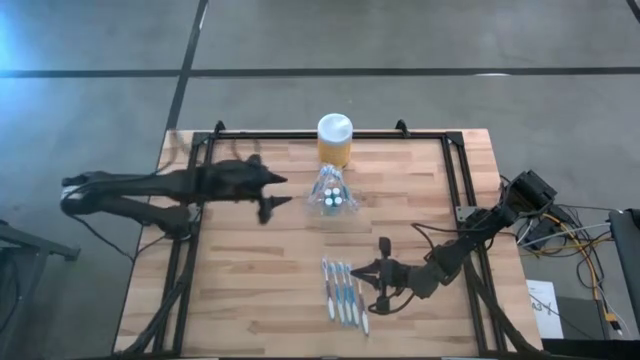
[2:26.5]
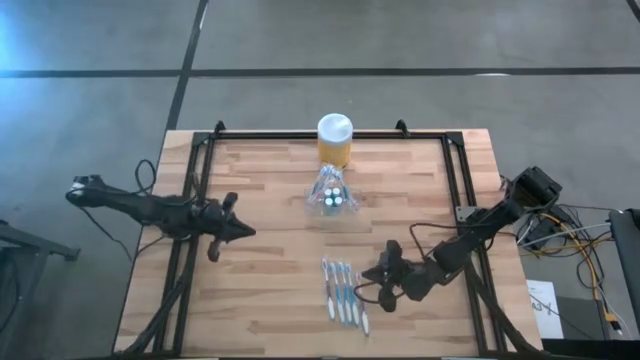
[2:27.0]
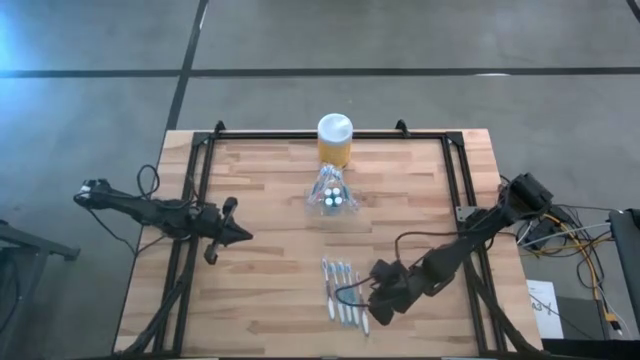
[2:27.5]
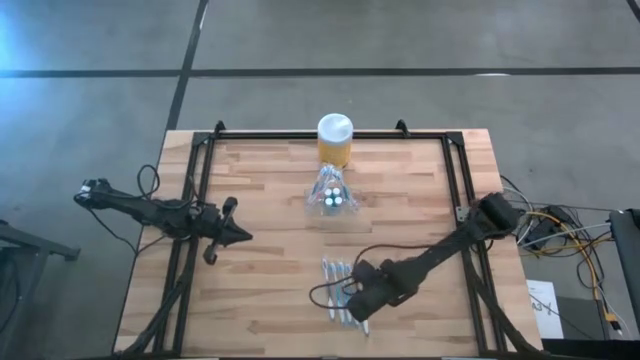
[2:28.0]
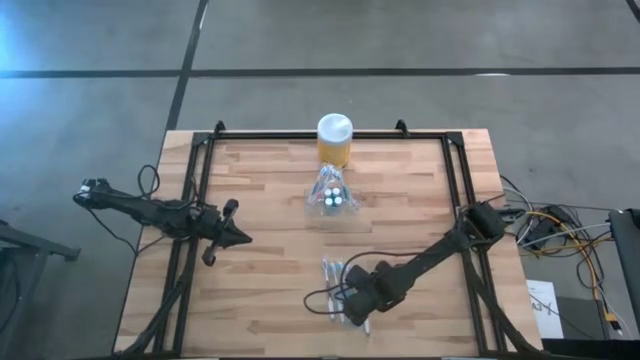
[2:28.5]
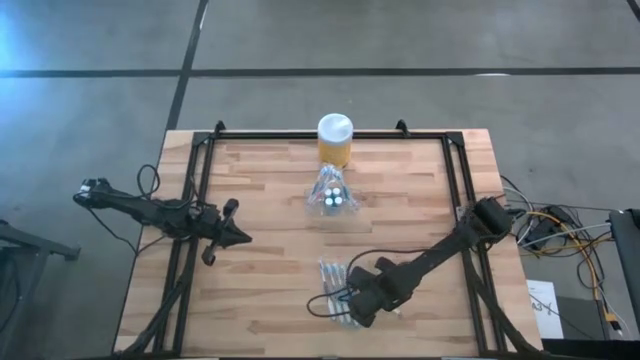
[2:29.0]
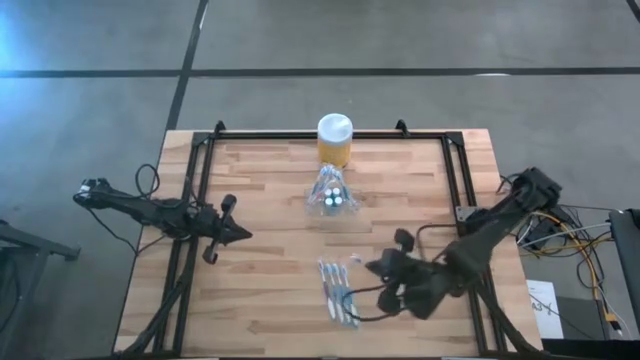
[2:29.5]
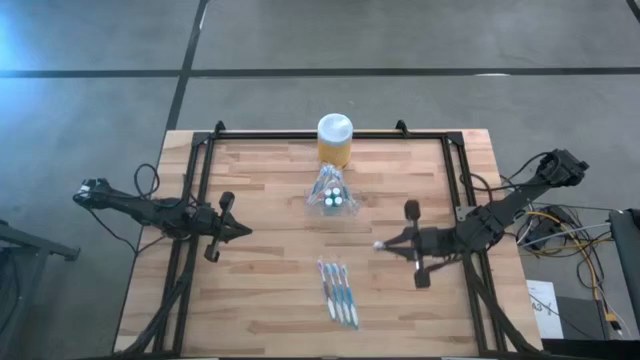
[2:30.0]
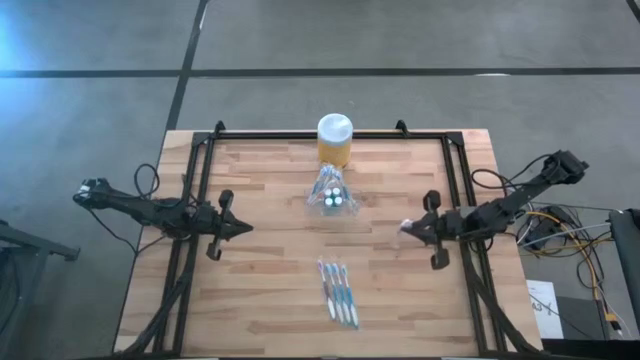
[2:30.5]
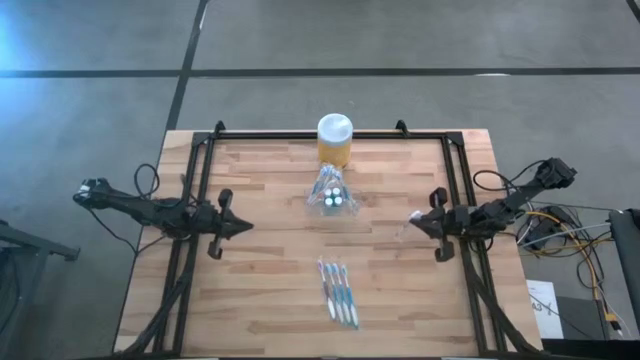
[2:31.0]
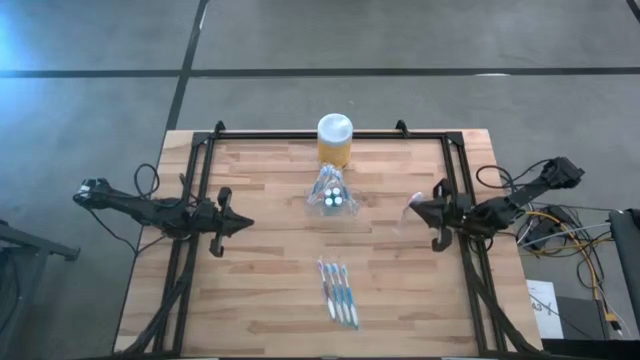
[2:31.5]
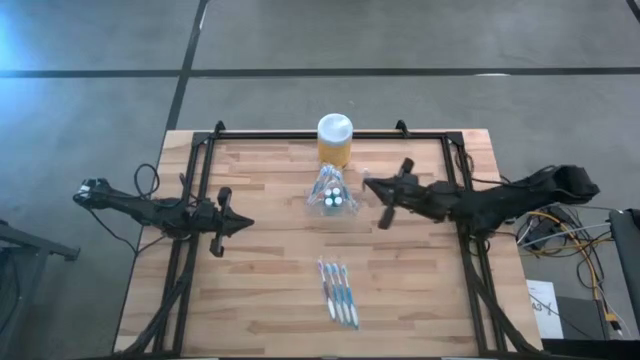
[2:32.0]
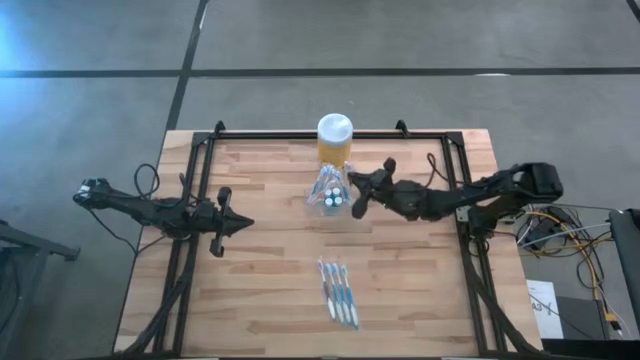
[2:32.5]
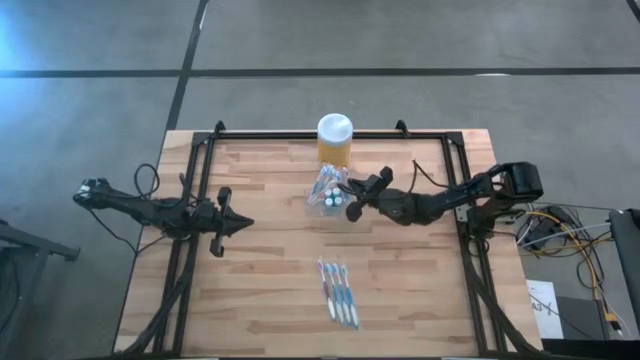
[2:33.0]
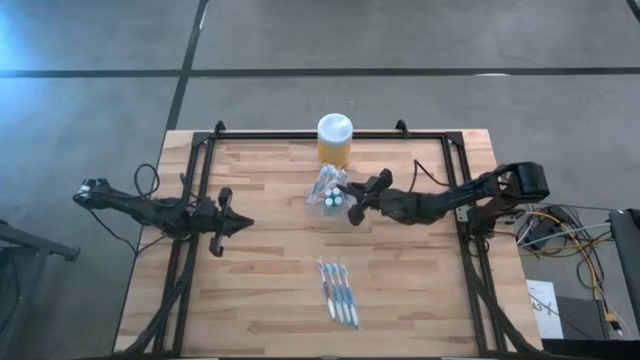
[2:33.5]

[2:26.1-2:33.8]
Task: Pick & Place toothbrushing station
Put the purple toothbrush into the right of the transparent organizer

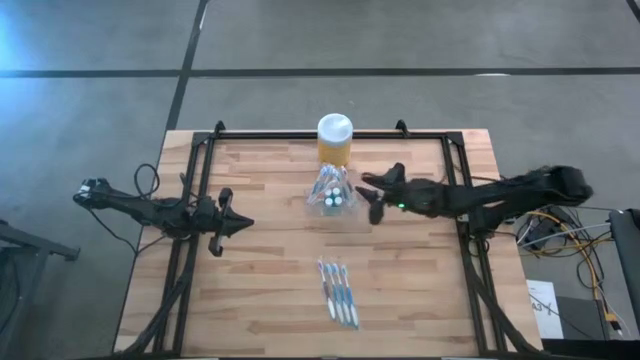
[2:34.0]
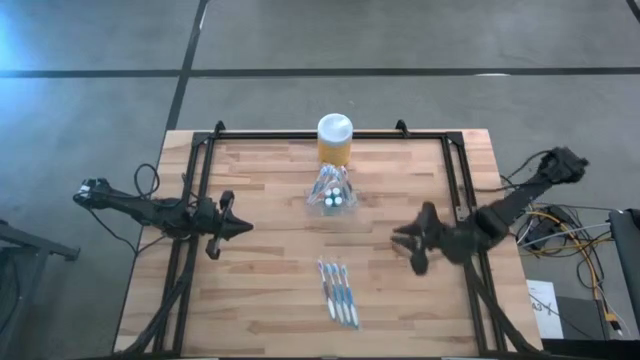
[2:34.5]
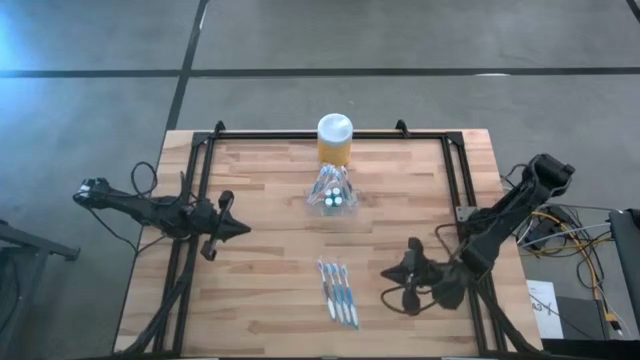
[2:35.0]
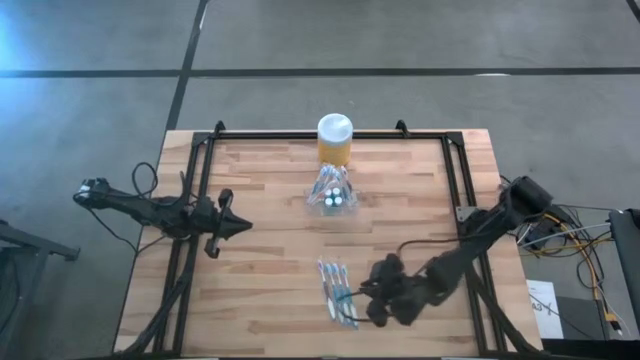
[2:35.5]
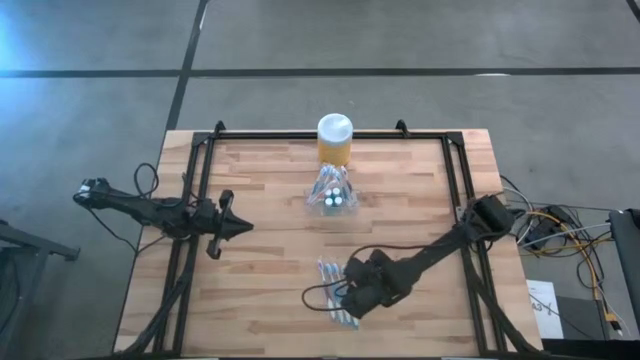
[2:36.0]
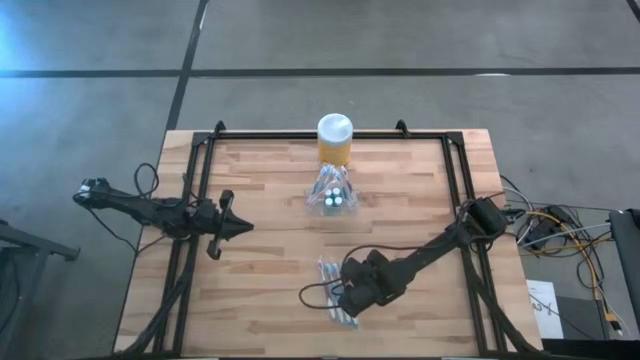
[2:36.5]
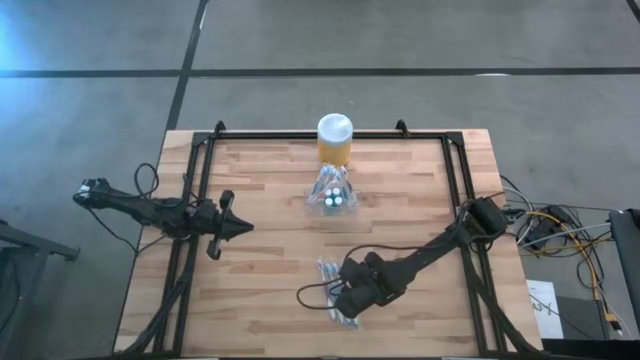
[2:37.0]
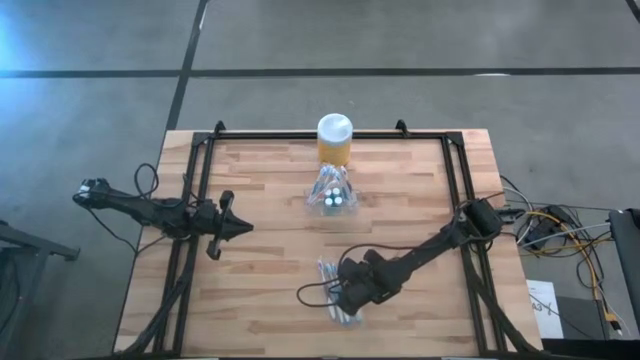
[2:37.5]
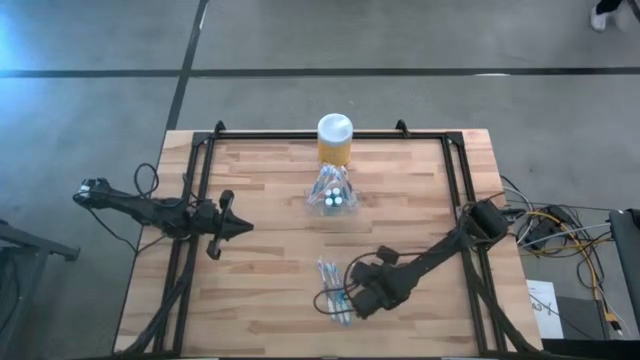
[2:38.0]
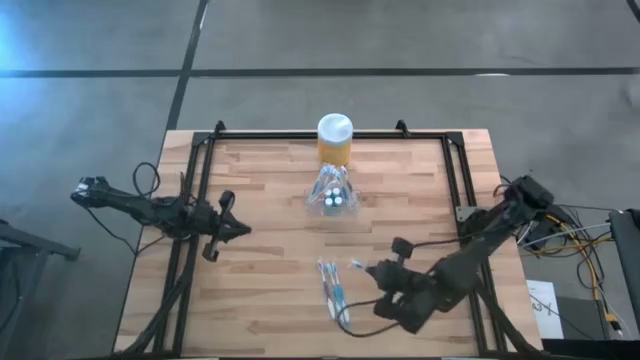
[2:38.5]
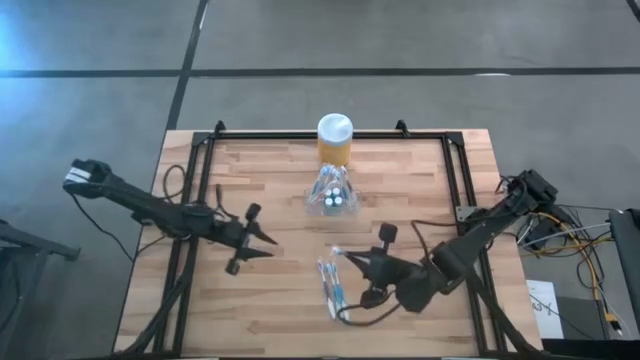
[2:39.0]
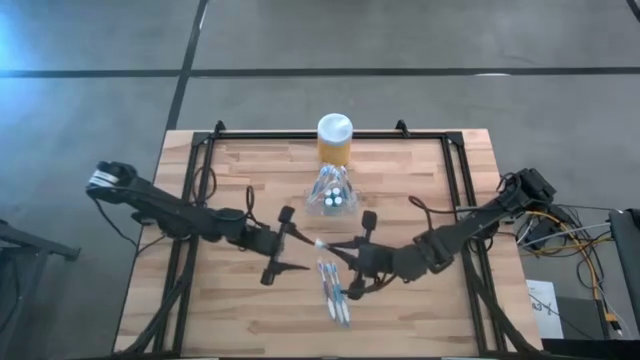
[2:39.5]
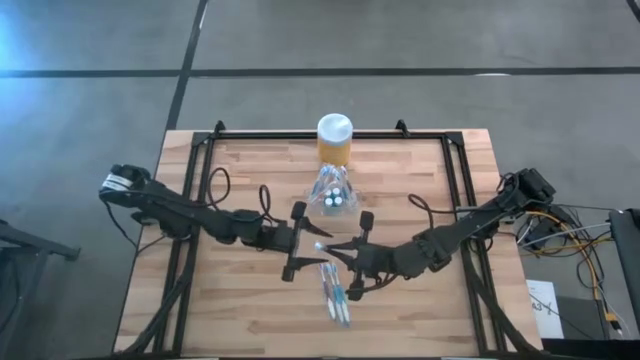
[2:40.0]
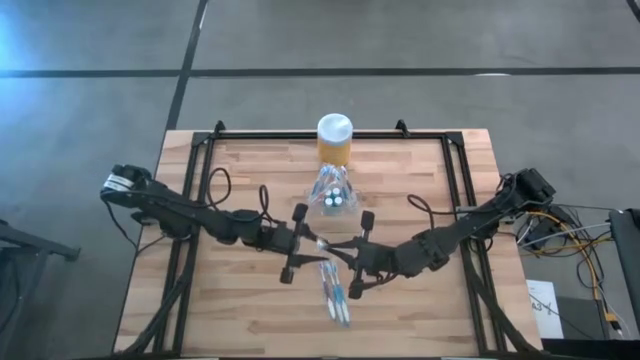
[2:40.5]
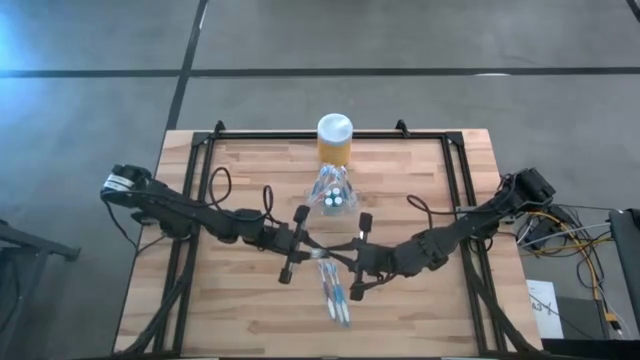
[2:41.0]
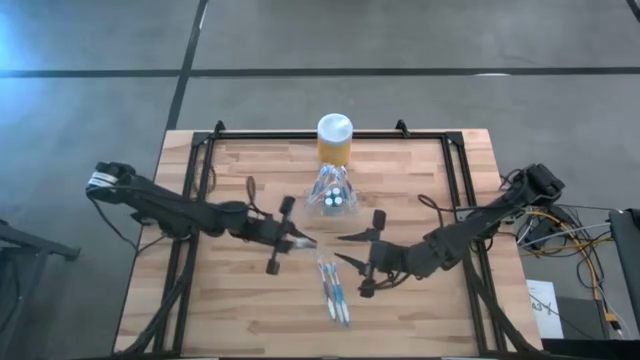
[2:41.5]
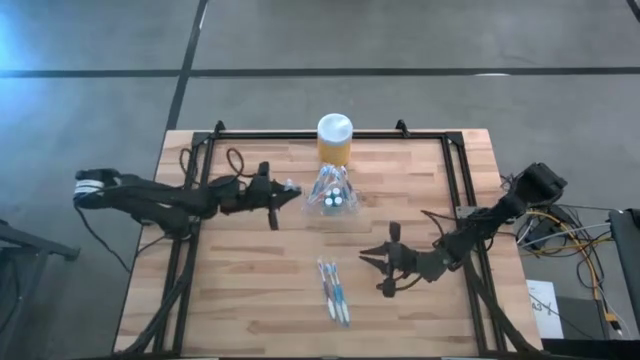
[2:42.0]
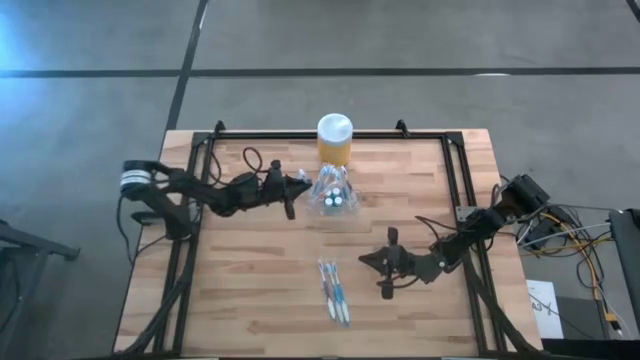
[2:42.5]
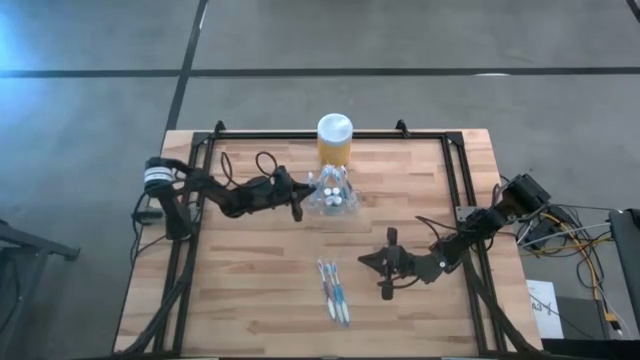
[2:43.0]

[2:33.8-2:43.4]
Put the blue toothbrush into the left of the transparent organizer

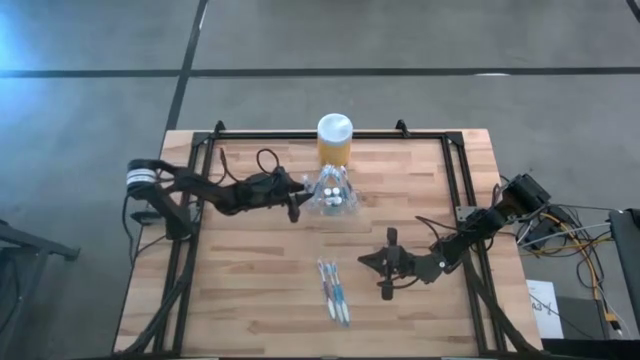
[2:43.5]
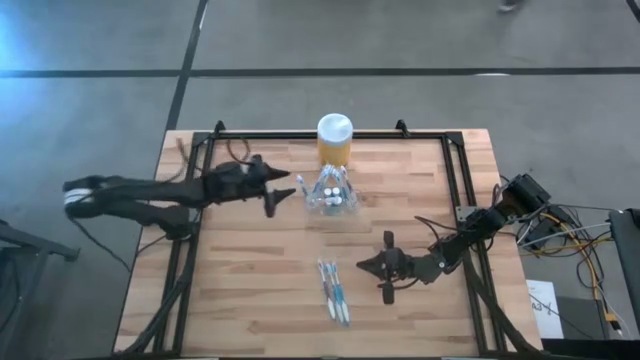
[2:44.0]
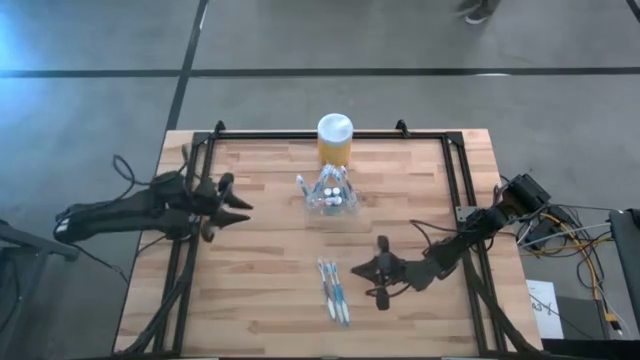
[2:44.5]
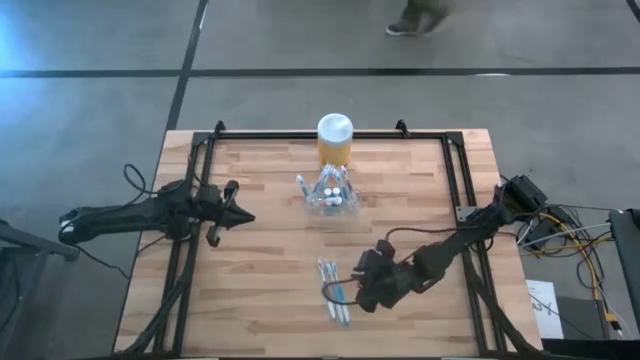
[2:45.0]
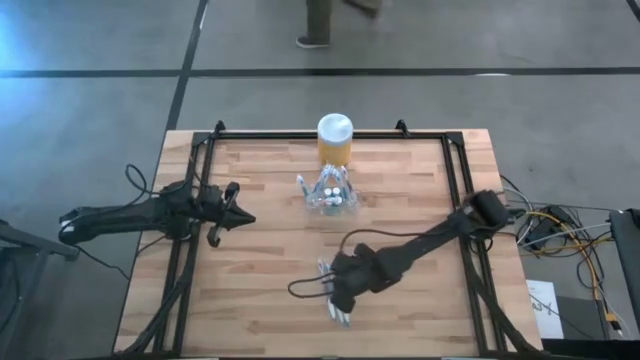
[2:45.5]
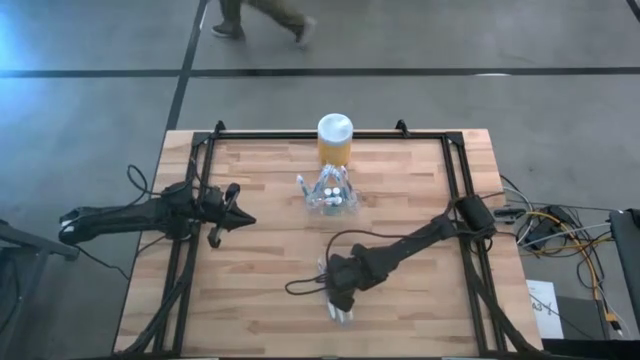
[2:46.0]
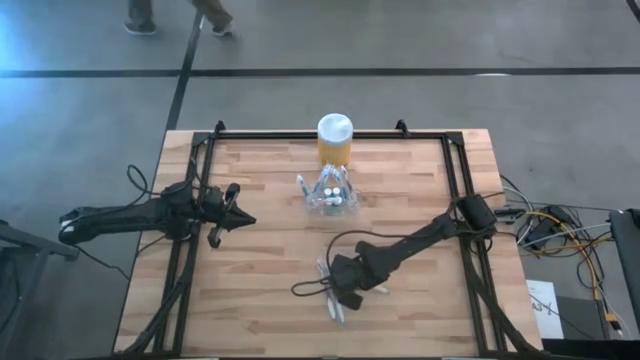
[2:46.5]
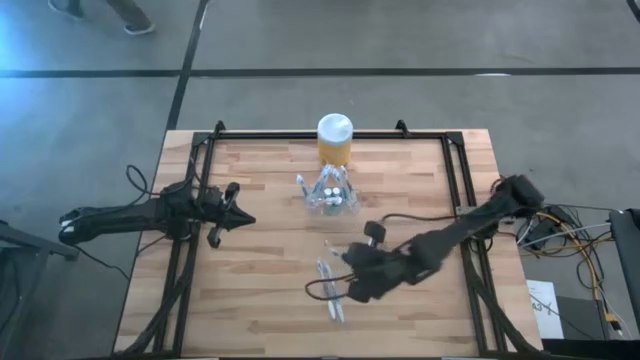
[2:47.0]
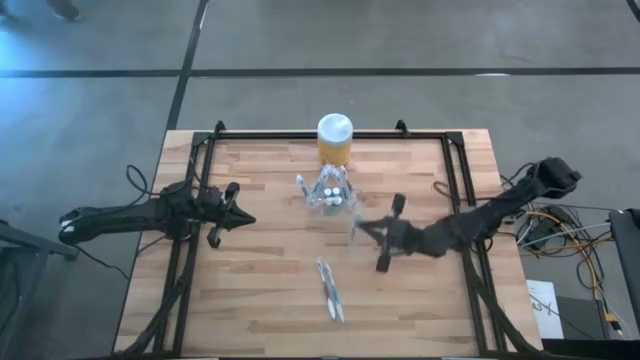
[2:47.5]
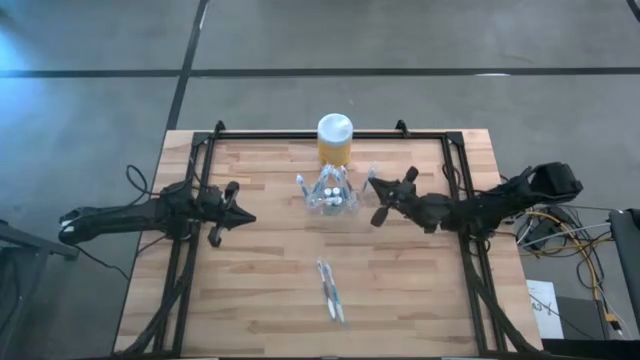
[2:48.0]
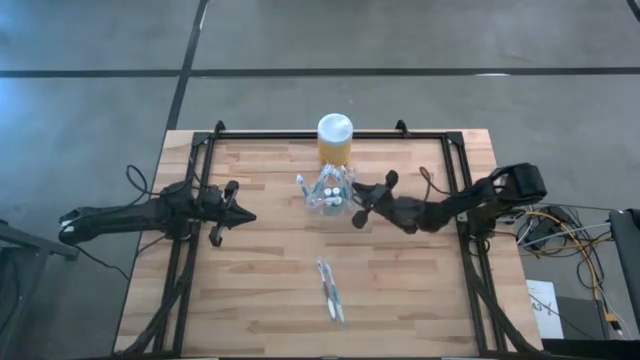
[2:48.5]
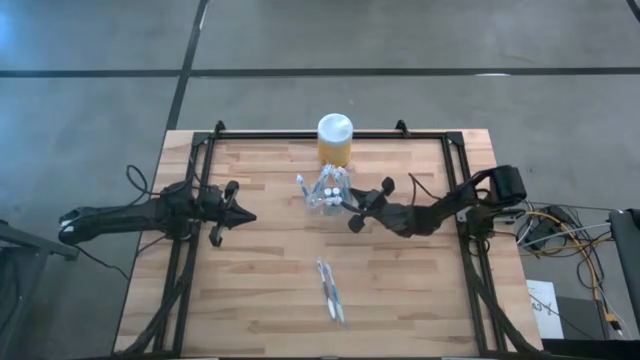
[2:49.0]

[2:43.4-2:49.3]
Put the blue toothbrush into the right of the transparent organizer
